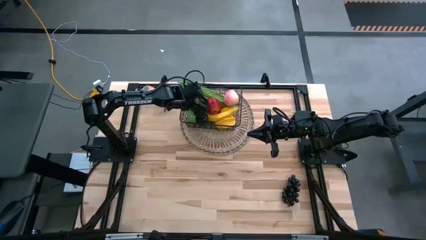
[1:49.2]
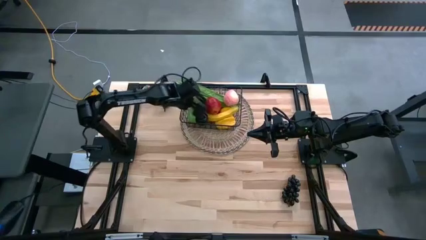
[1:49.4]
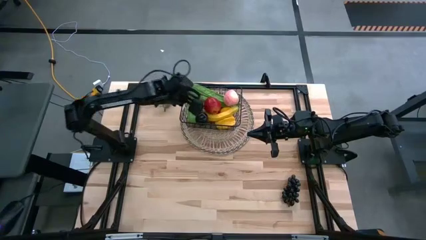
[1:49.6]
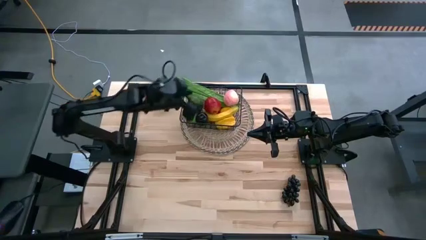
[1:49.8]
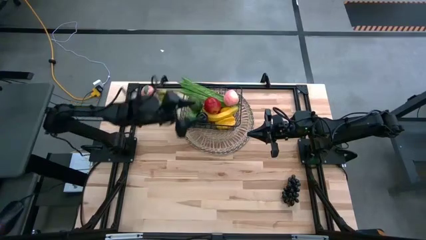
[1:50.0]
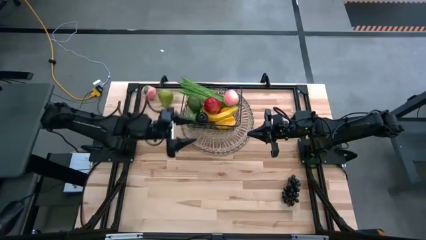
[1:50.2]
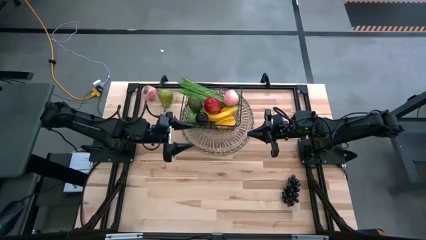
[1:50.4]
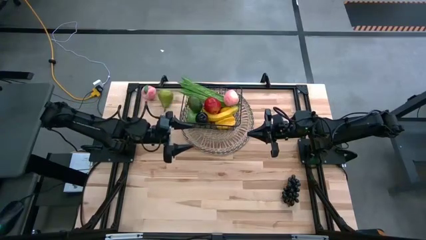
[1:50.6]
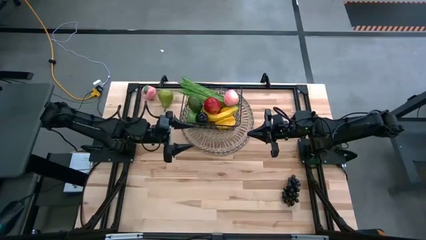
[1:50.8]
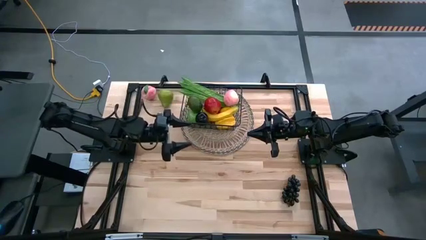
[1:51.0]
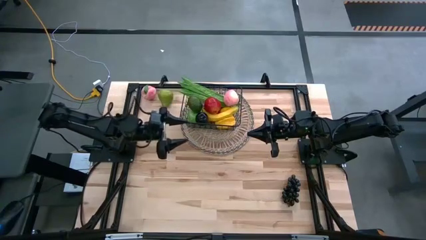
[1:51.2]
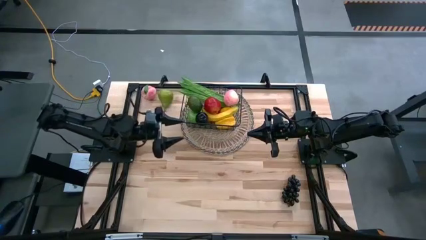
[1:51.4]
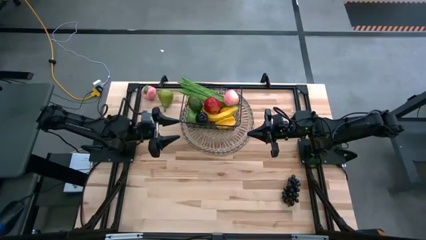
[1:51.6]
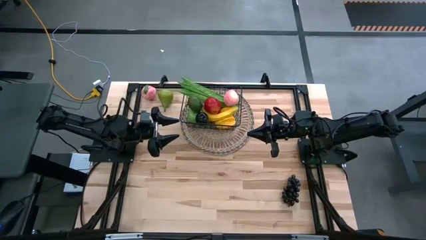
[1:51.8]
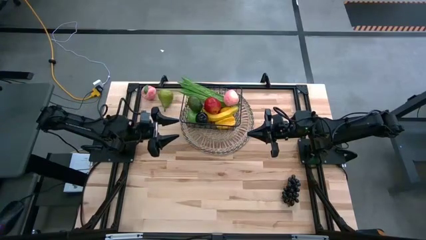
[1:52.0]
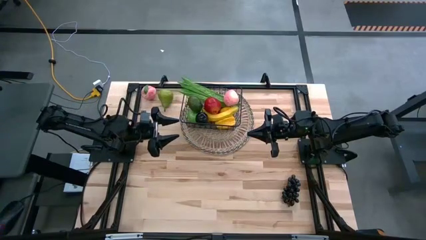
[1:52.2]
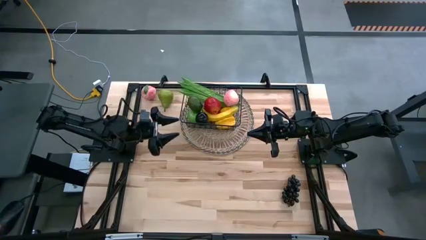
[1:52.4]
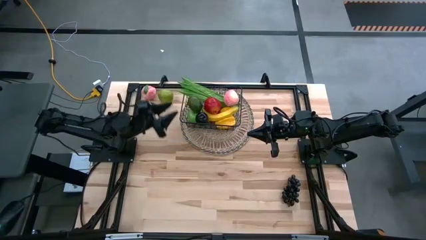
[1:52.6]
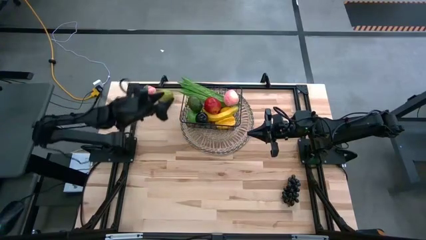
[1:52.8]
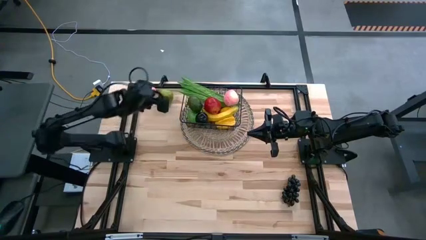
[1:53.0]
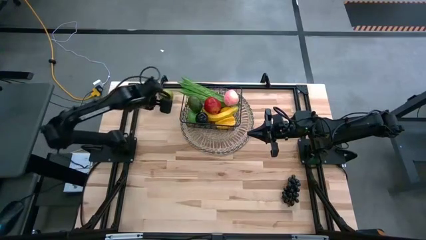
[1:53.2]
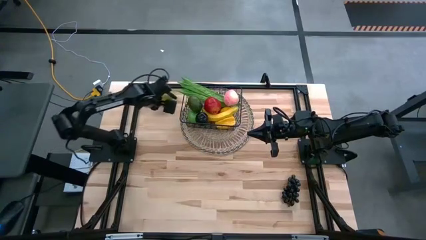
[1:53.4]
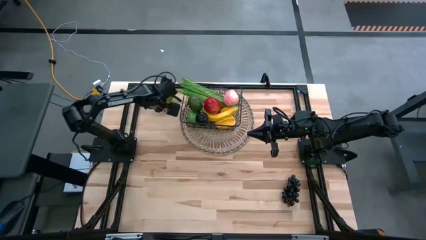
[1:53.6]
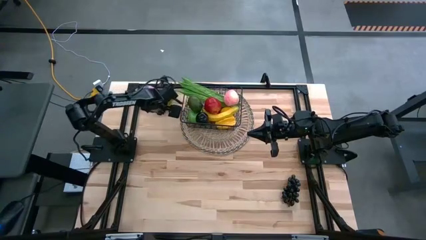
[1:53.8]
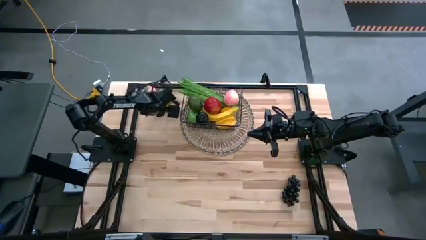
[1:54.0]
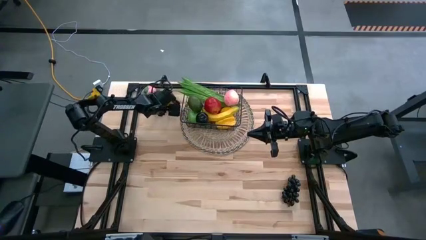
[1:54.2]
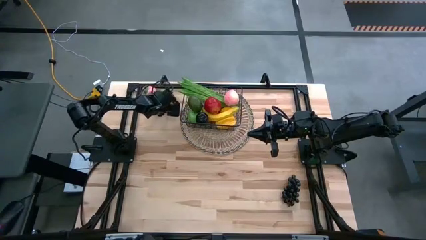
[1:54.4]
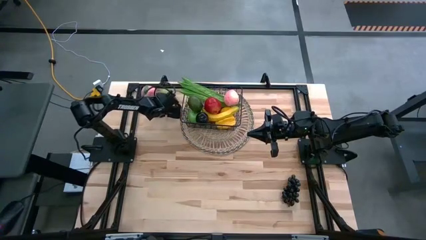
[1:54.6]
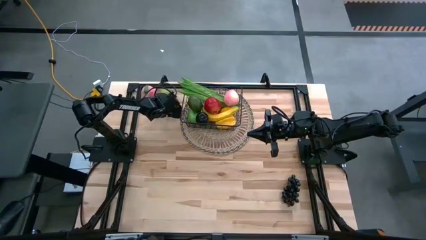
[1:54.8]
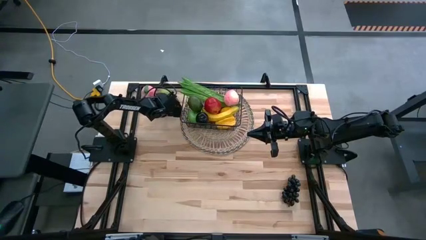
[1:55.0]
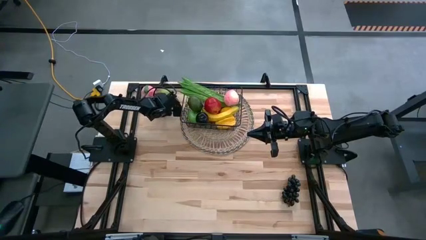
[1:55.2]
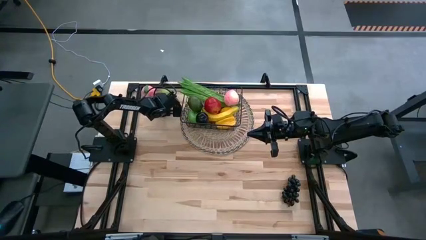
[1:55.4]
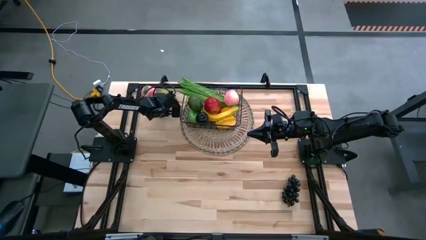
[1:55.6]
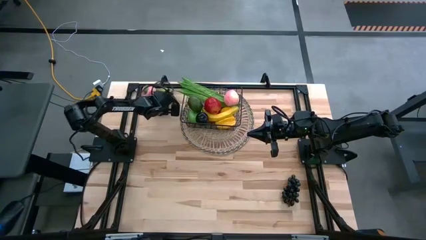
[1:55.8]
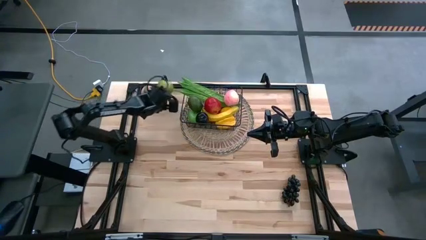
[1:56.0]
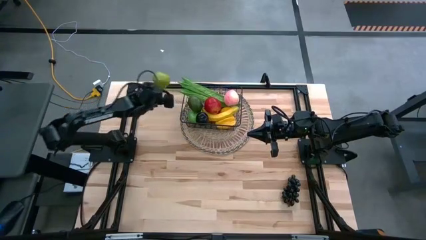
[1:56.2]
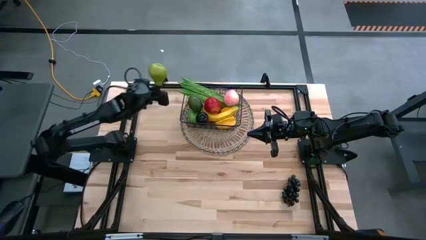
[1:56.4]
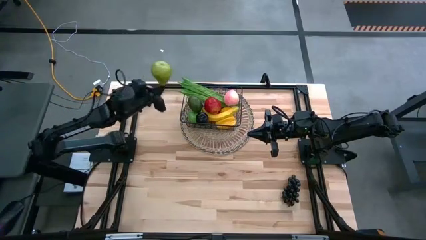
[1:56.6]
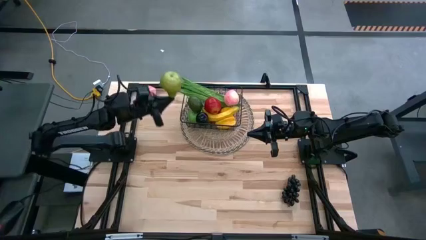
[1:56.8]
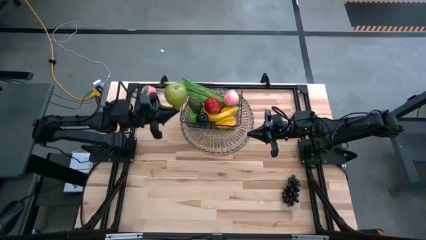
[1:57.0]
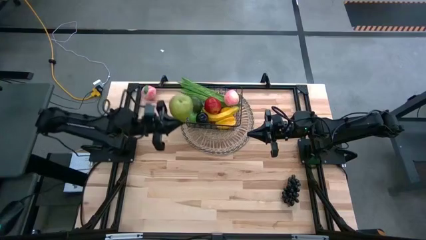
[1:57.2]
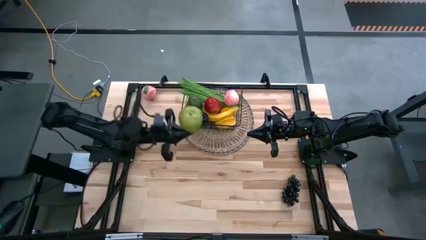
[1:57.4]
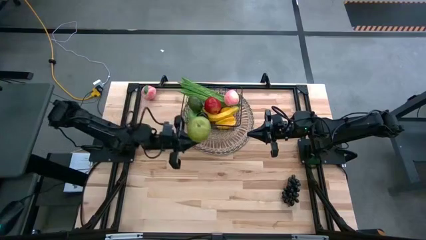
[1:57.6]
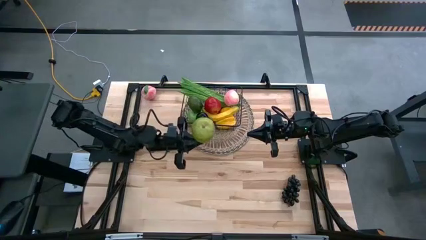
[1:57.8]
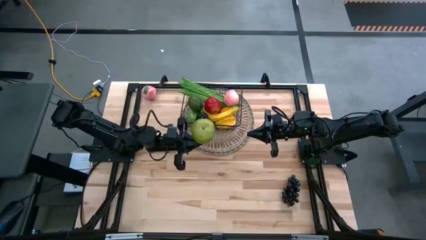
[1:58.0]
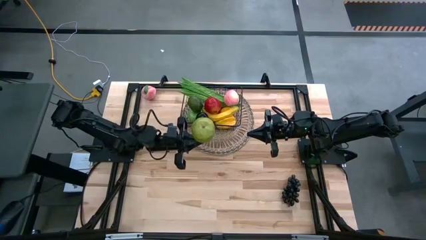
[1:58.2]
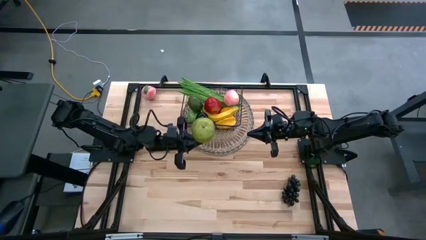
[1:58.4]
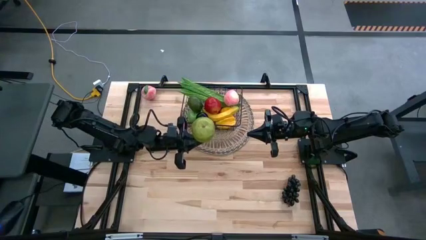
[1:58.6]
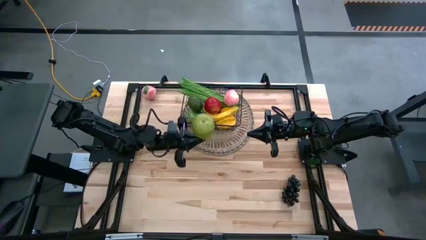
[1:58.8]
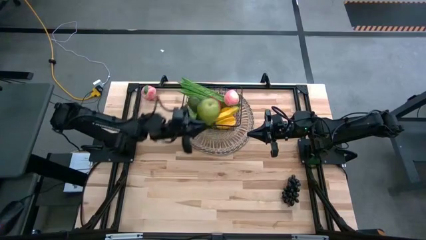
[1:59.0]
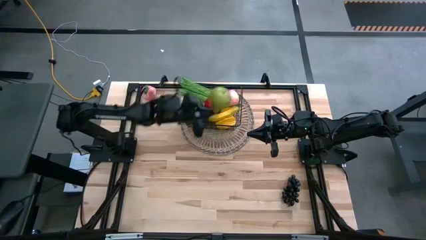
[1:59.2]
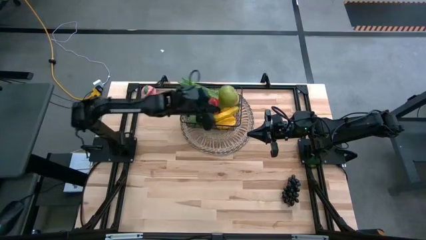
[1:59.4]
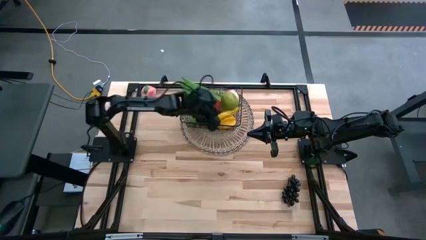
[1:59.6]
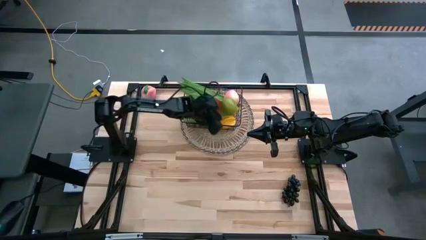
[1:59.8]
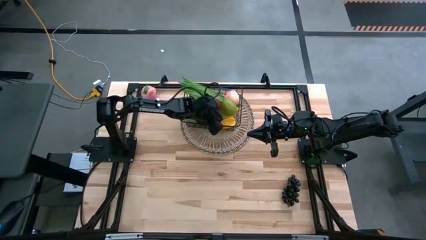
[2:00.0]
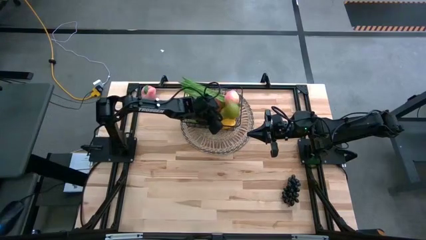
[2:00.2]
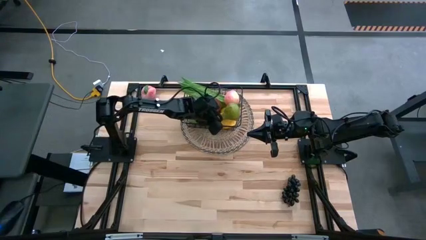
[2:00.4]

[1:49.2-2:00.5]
Task: Build produce basket
Put the pear into the black wire basket

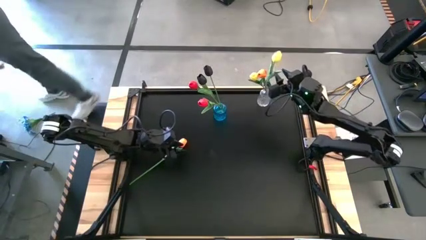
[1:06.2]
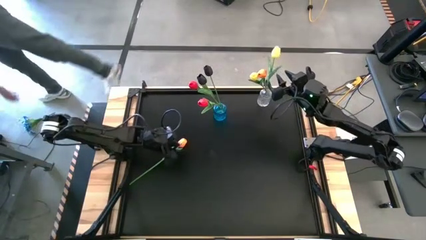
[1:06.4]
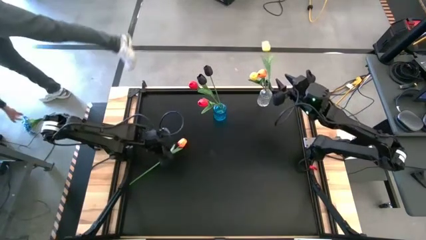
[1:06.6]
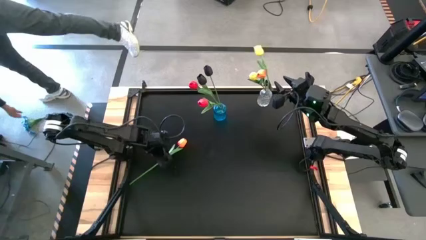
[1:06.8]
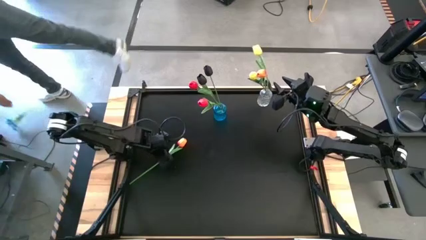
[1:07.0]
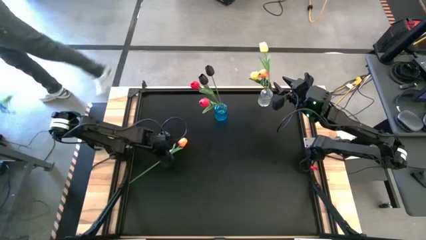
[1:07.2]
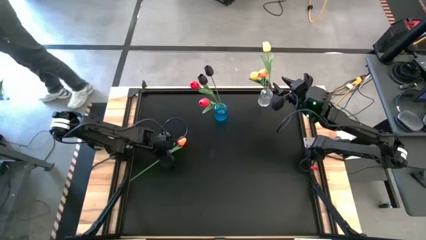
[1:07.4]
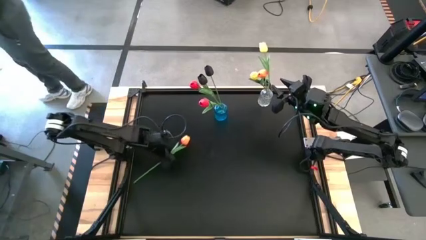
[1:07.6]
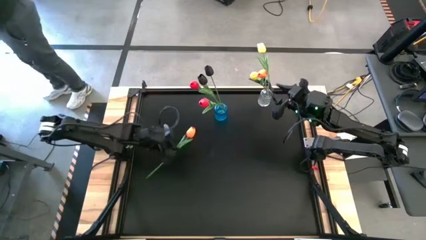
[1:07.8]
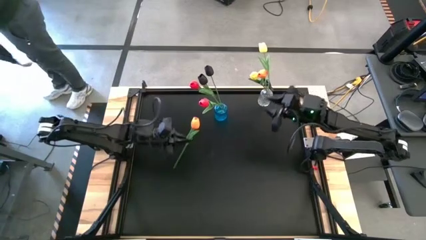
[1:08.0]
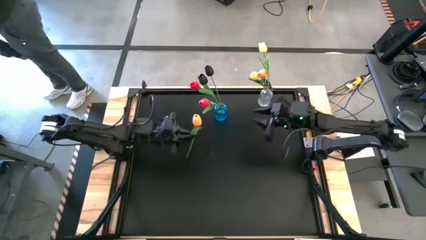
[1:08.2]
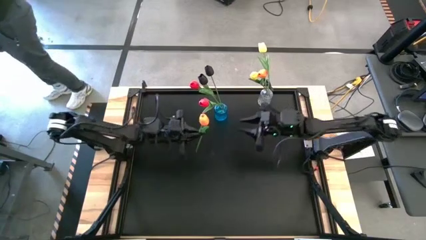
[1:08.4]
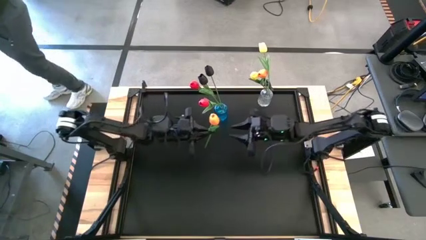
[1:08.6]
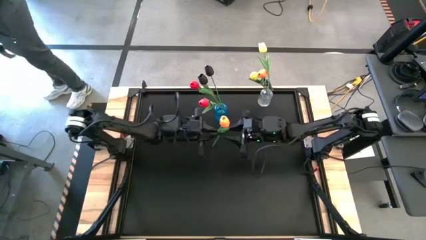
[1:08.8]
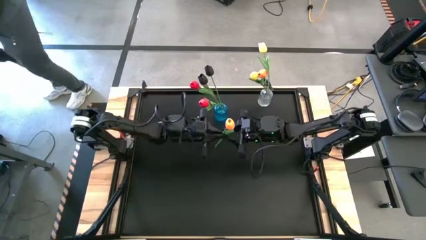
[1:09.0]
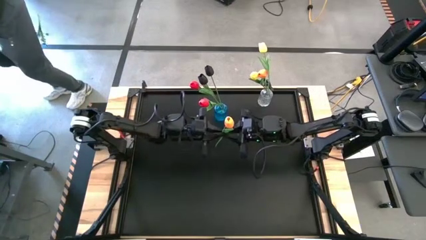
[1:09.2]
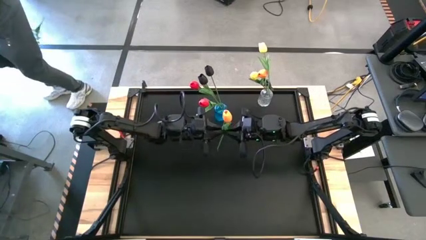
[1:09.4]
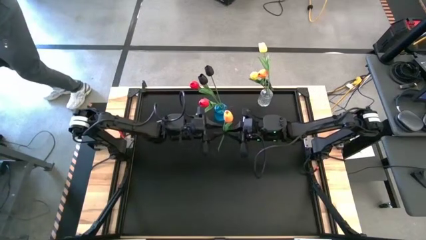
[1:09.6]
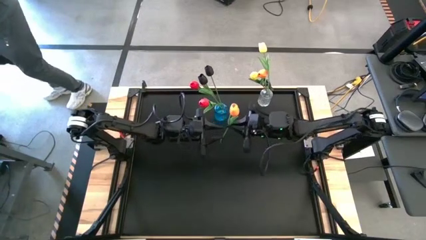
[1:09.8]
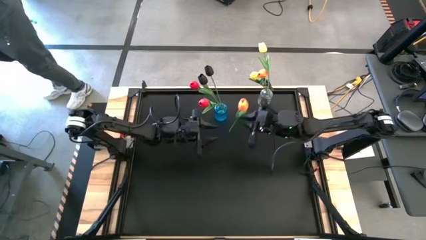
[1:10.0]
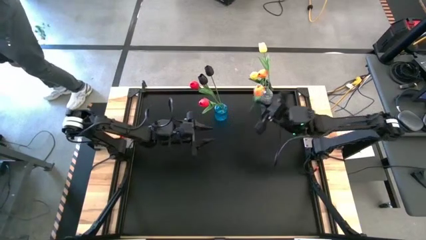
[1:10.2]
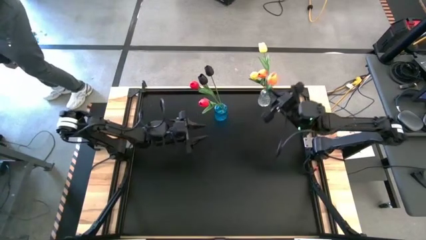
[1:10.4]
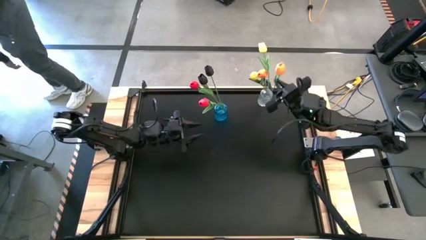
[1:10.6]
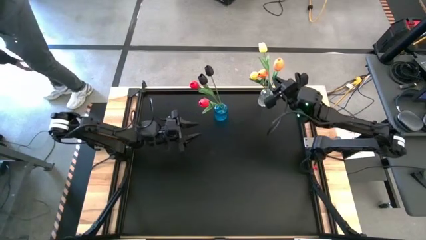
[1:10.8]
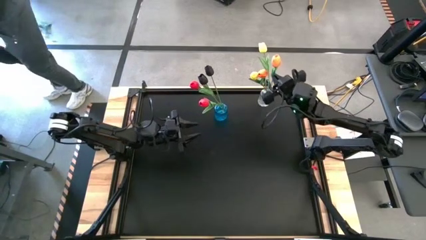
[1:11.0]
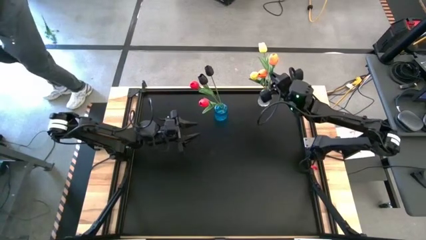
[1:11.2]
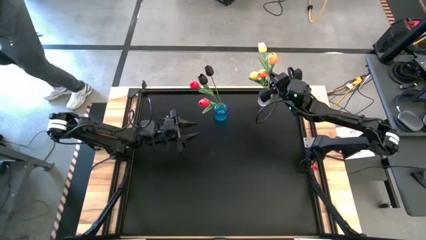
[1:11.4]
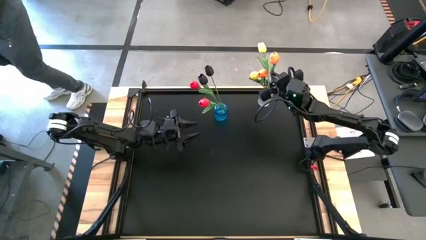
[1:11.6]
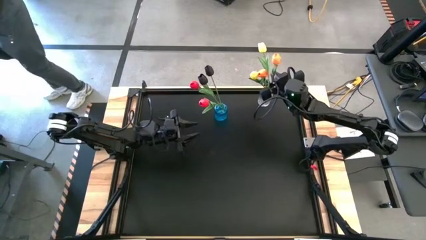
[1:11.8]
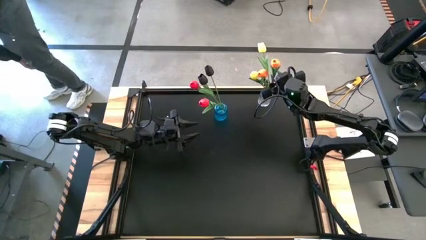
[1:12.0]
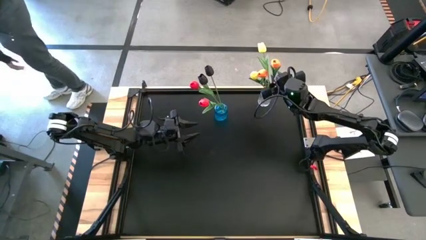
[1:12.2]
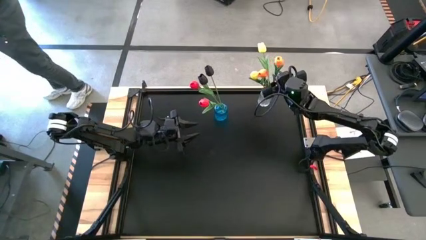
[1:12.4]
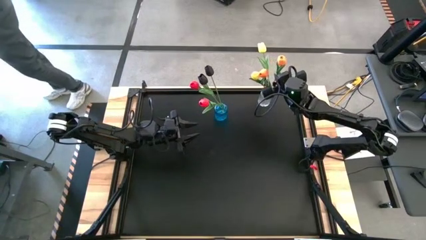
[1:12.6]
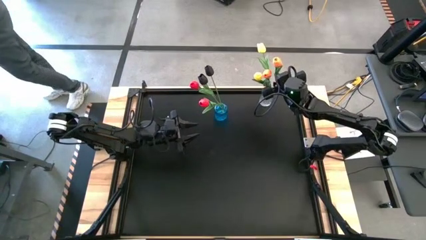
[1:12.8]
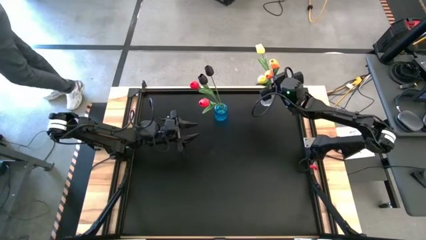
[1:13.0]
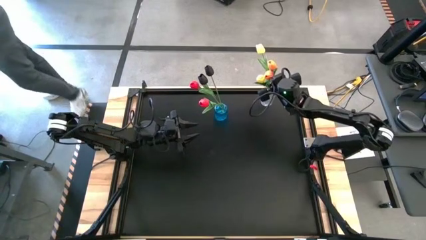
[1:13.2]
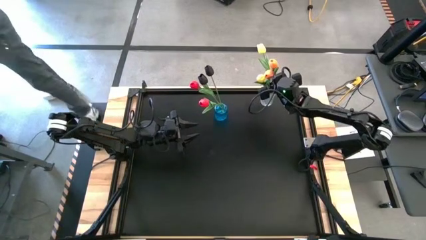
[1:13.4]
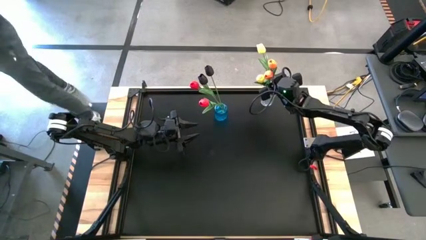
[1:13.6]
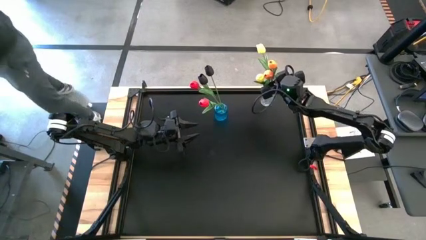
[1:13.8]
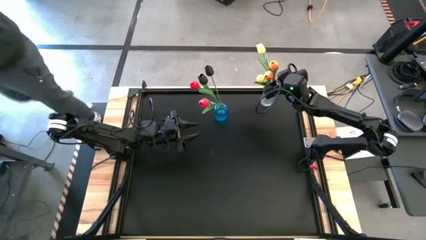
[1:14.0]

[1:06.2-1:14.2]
Task: Sort flowers into vase by color
Put the orange flower into the transparent vase
